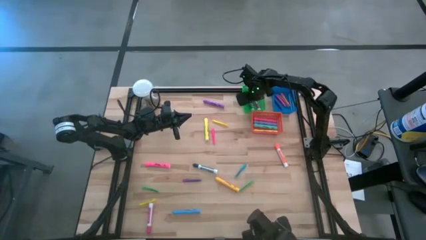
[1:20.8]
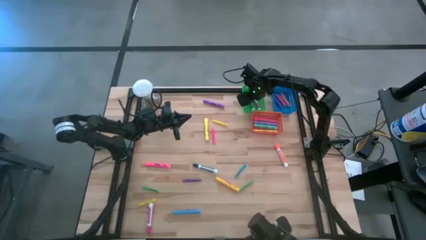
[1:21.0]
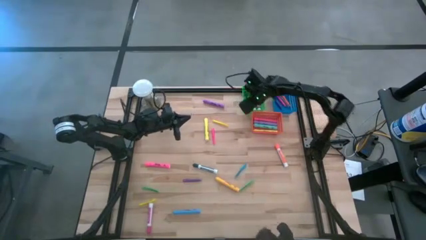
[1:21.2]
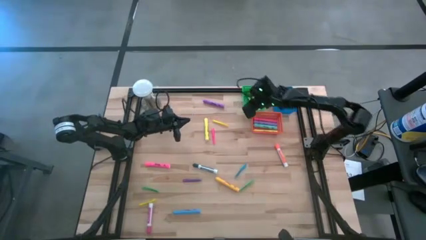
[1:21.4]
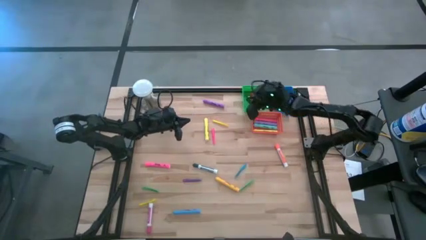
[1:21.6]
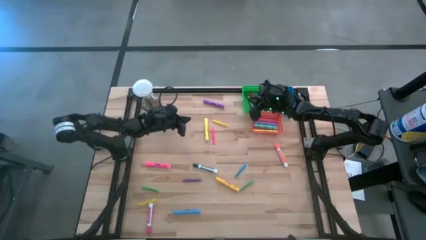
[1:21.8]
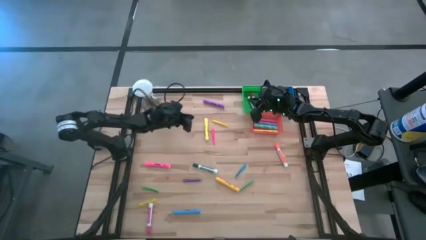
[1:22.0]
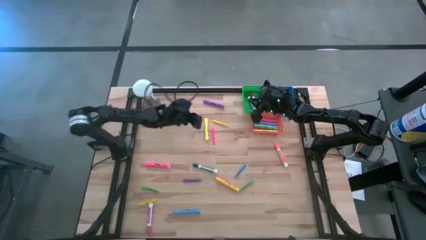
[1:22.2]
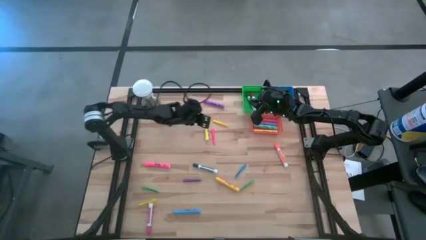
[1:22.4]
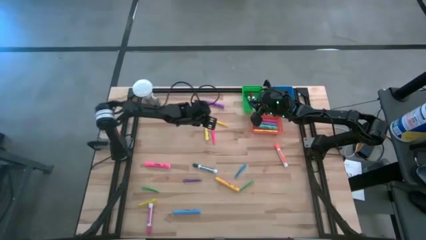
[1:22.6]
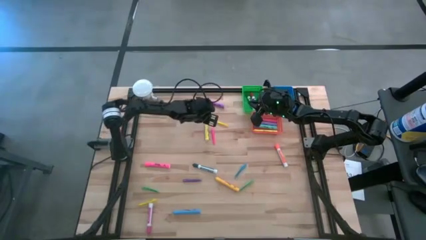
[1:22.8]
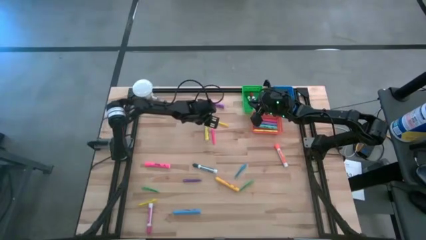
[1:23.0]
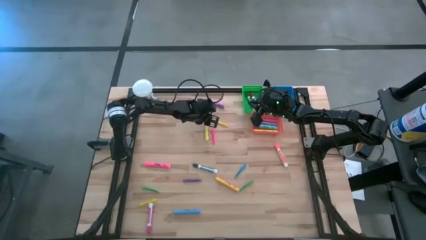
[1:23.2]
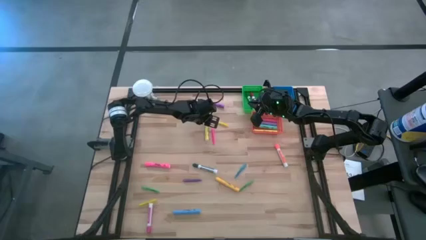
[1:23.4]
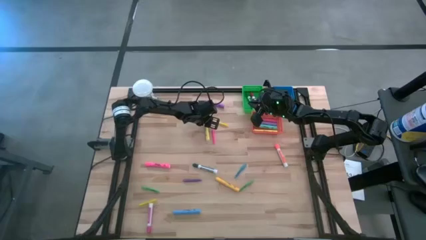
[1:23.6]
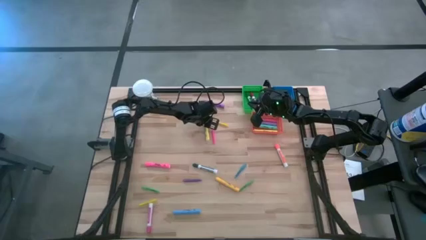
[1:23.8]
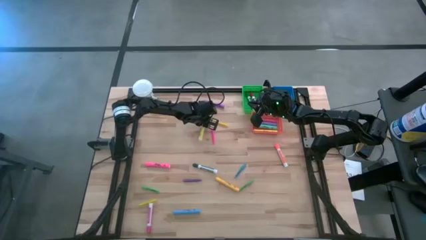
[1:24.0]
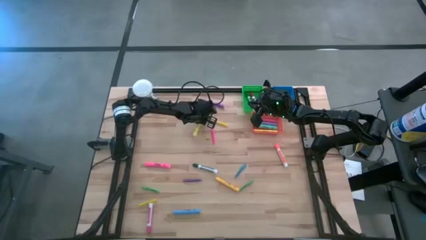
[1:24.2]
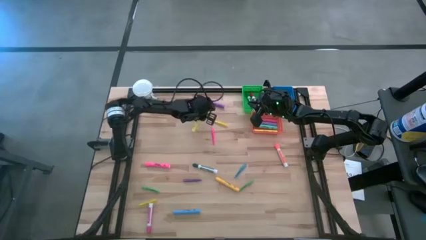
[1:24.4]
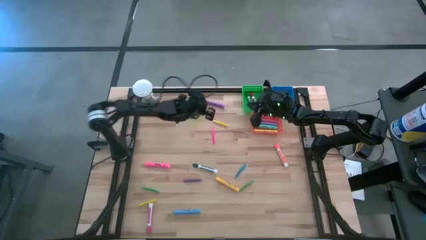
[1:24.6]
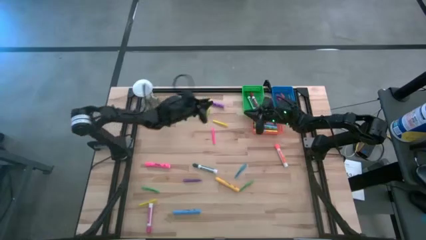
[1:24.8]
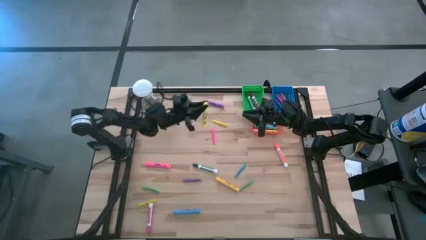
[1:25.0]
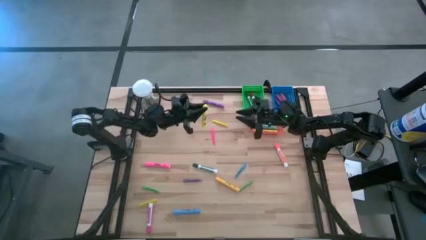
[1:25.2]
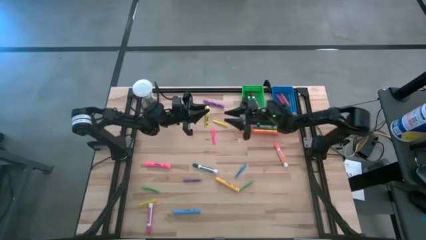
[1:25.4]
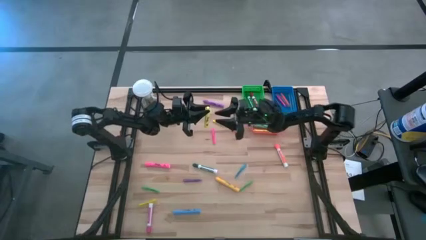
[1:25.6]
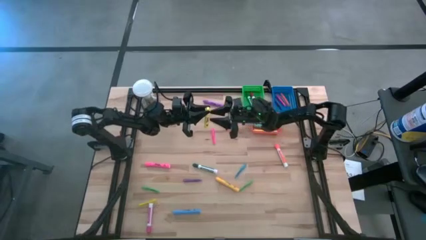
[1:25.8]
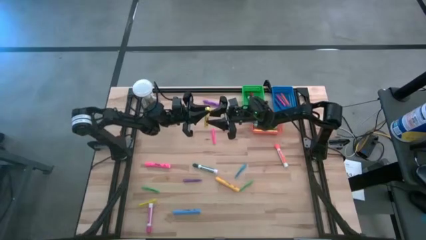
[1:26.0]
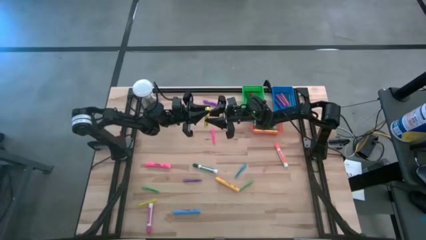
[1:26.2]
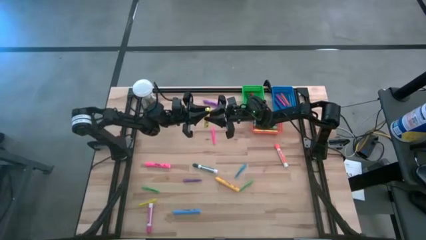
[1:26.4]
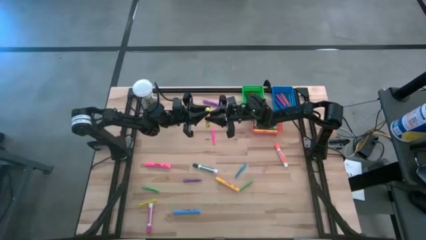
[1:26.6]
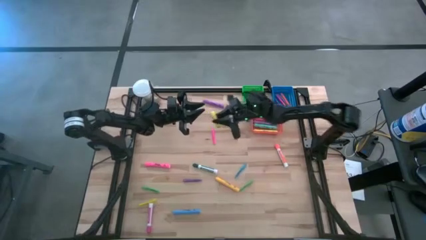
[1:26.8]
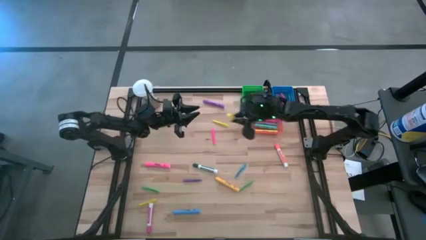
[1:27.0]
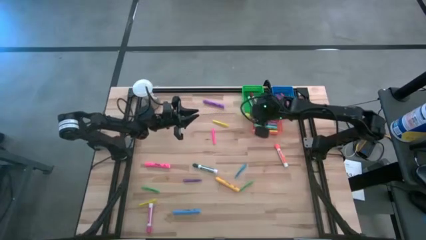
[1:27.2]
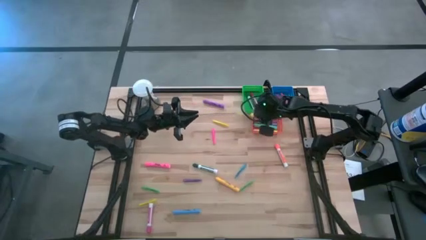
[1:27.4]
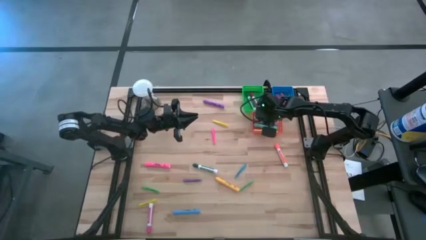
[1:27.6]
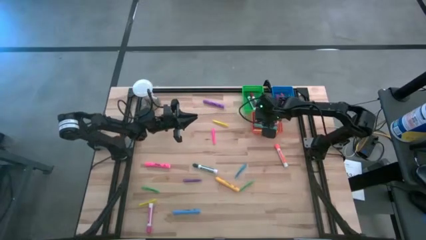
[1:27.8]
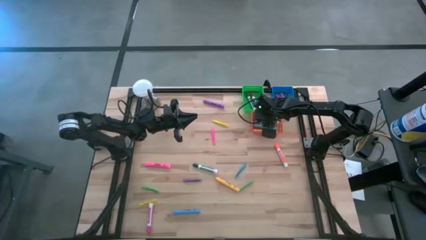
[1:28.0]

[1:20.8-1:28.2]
Task: Pick & Place Markers
Put the top yellow highlighter pen into the orange bin

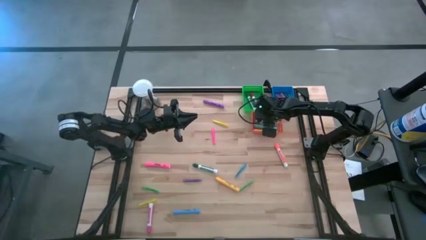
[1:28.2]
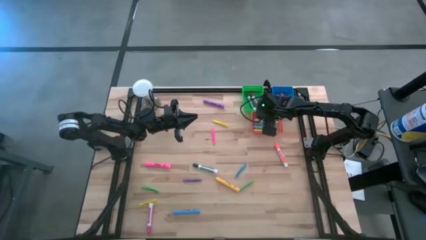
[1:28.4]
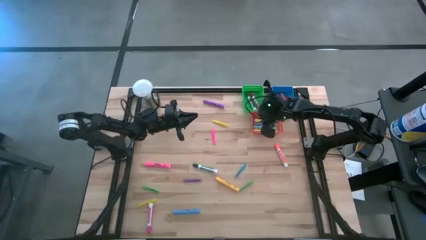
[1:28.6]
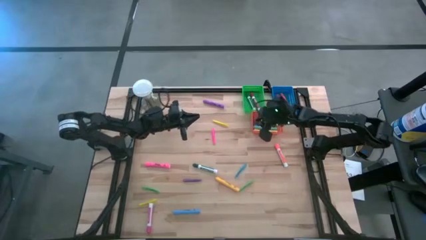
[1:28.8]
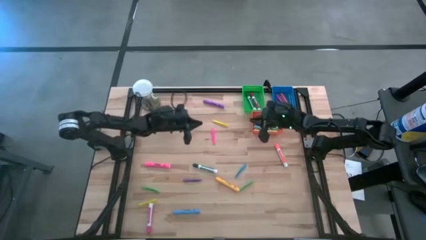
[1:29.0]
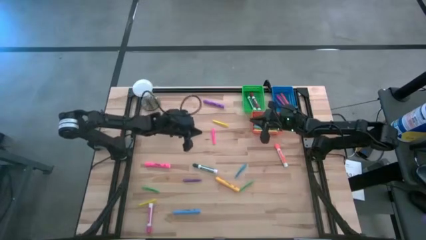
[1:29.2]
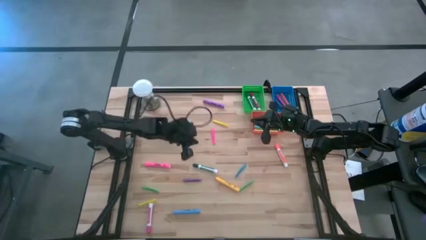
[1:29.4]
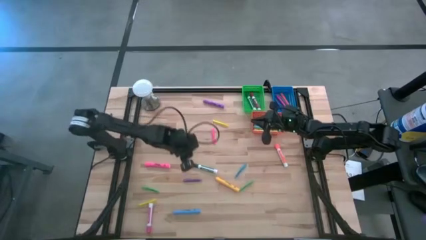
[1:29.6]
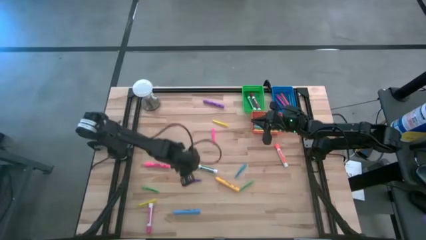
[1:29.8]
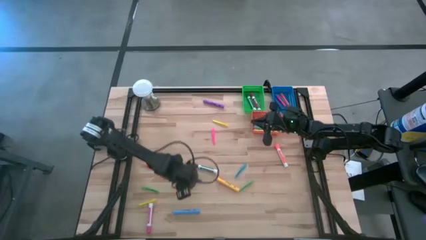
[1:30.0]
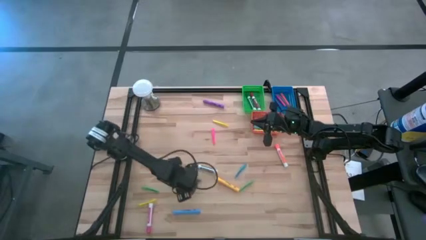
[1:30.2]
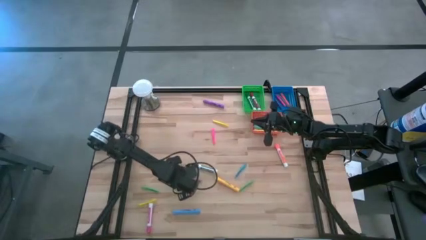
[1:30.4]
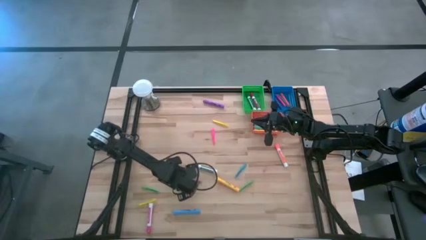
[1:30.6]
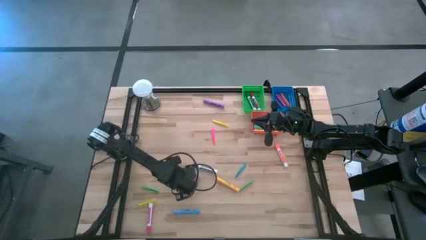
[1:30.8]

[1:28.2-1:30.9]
Put the violet pen into the blue bin

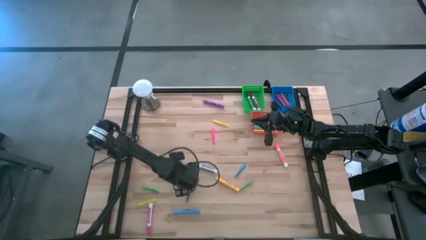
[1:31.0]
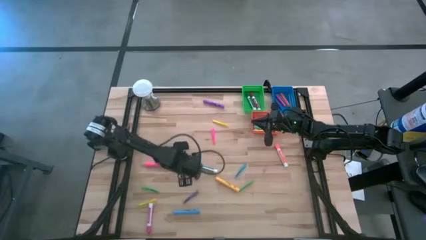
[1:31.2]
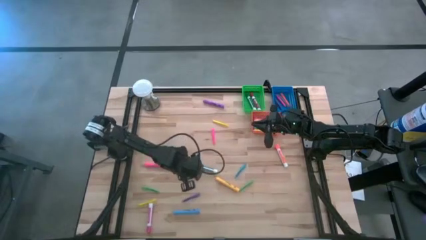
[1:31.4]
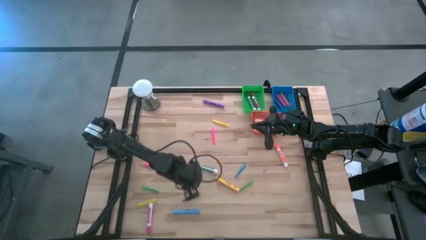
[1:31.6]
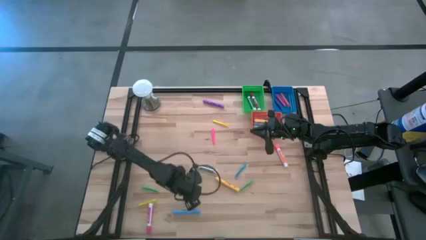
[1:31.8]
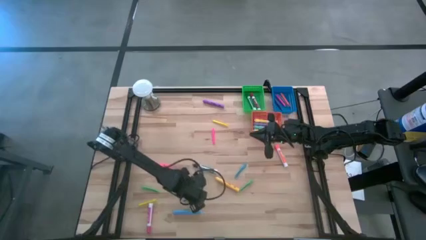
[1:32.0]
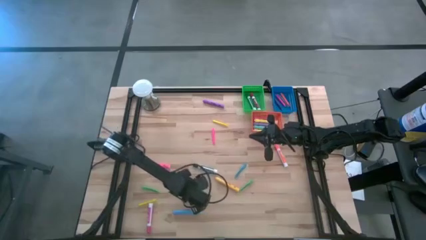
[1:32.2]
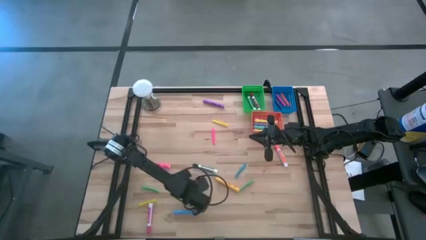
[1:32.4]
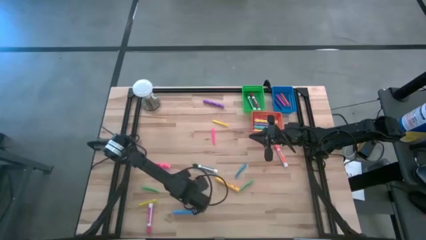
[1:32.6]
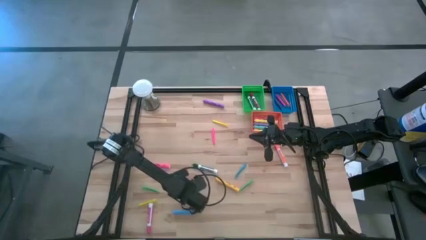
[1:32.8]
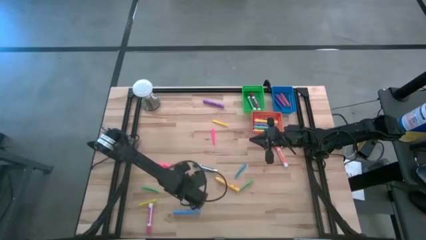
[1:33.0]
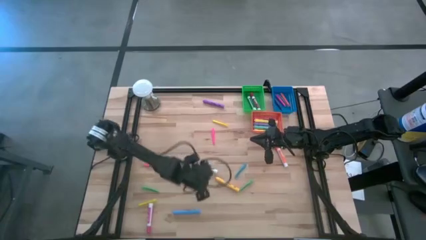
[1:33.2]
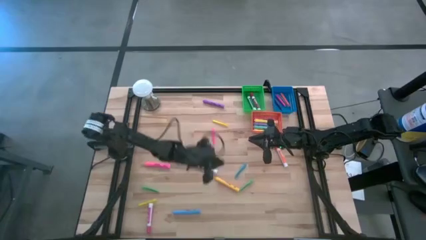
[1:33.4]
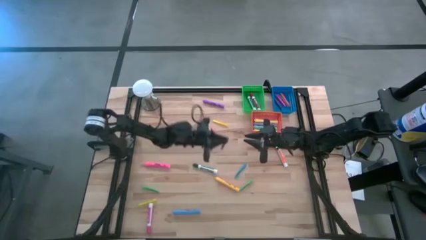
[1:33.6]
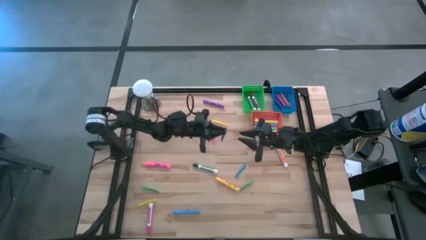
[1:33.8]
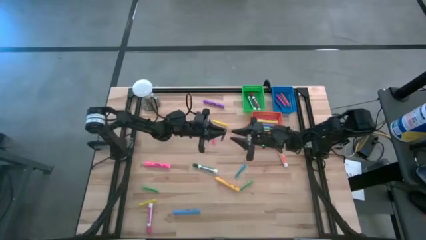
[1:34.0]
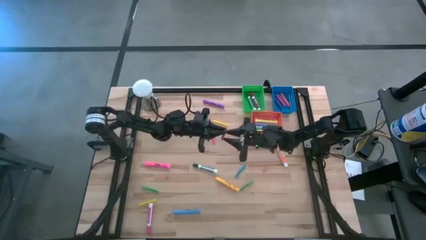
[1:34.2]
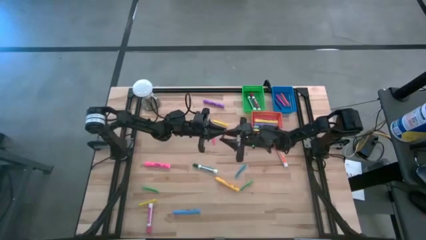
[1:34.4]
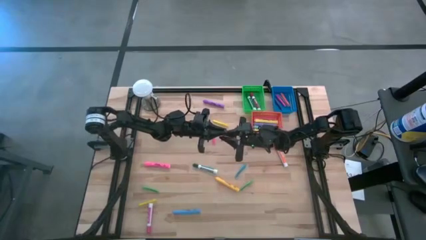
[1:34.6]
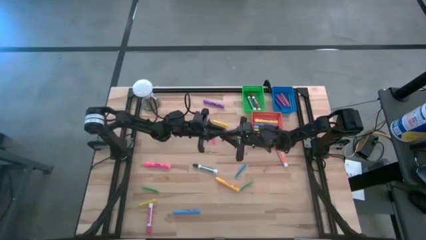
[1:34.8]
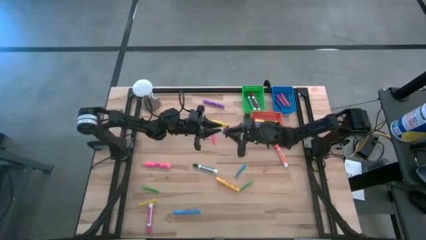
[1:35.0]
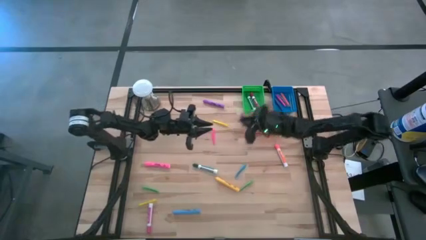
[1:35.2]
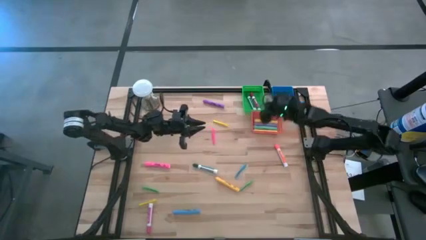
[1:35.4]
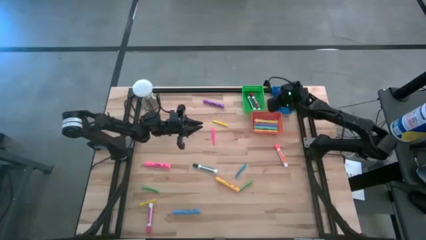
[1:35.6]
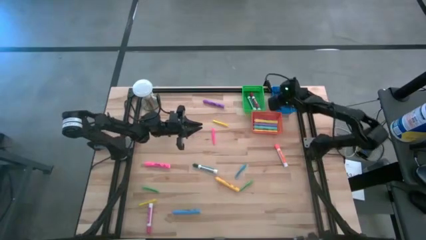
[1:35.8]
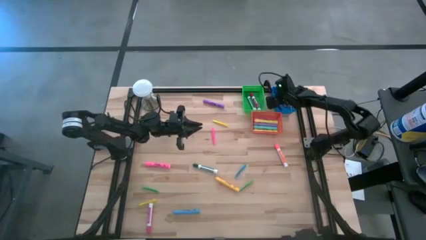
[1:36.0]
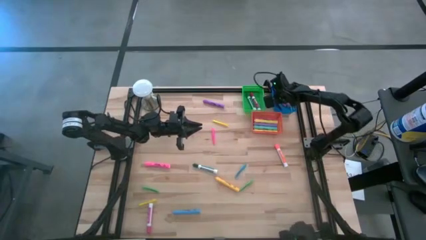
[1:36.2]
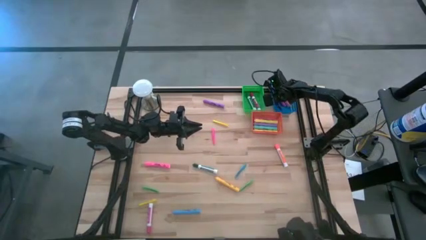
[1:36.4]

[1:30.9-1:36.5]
Put the violet pen into the blue bin

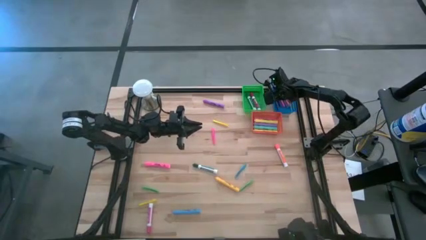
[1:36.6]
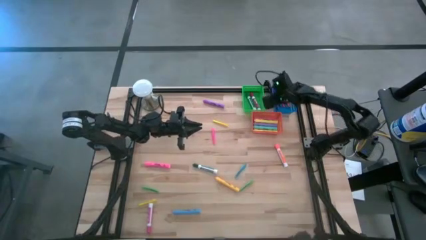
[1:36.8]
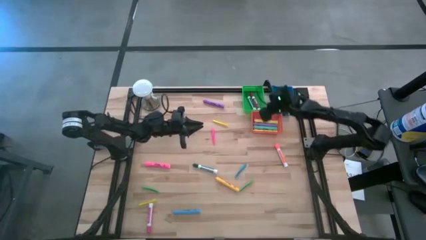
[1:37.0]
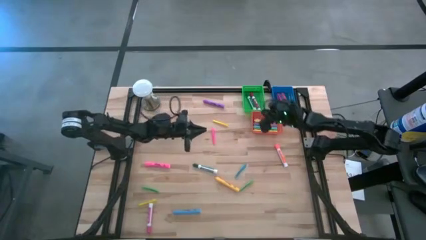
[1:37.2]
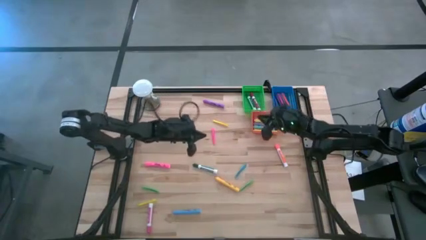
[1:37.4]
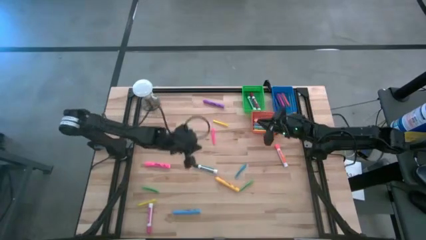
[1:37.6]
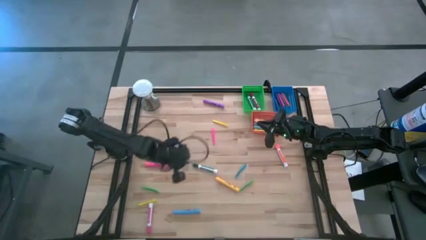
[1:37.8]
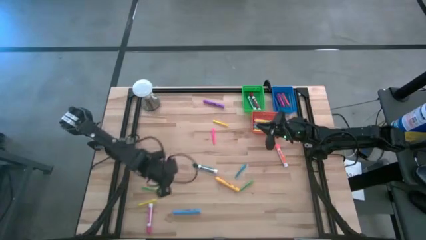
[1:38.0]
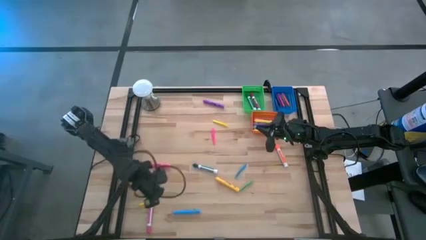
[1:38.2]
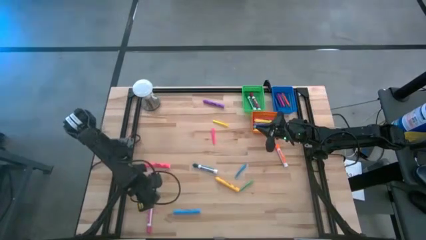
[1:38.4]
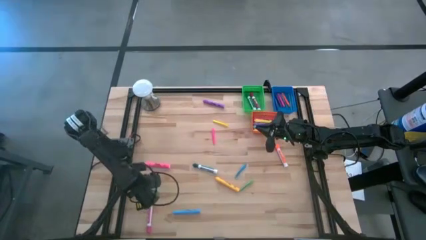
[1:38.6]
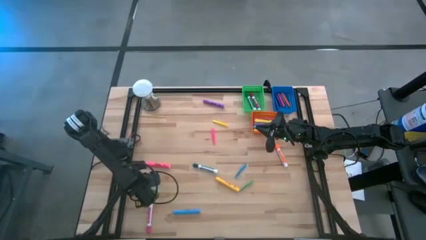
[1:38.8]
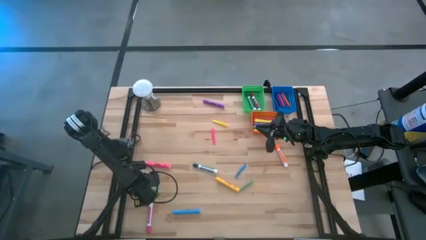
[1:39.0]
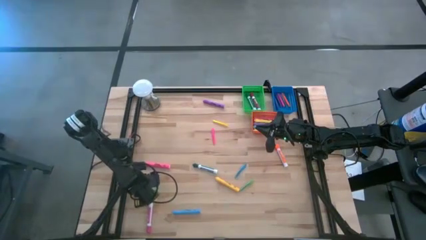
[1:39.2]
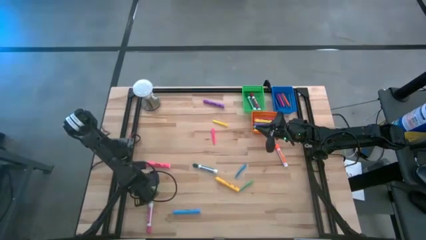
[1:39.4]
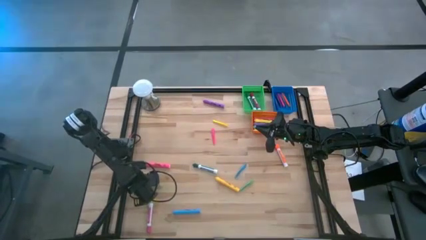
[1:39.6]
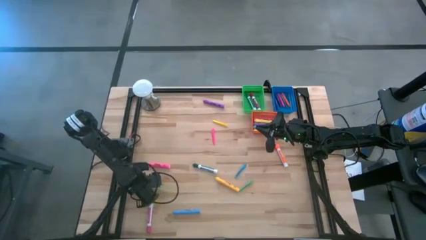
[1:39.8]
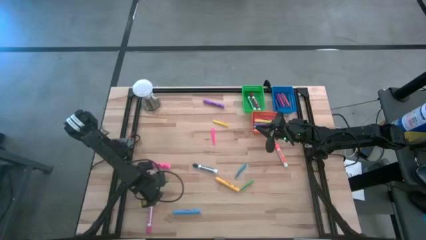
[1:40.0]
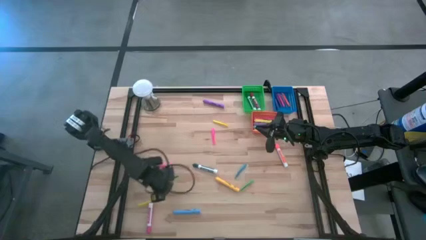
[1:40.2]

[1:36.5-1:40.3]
Put the left green pen into the blue bin
